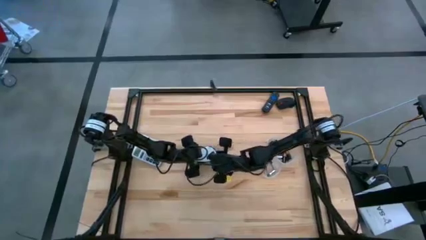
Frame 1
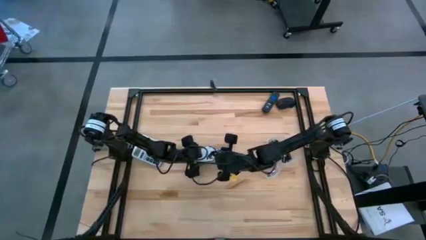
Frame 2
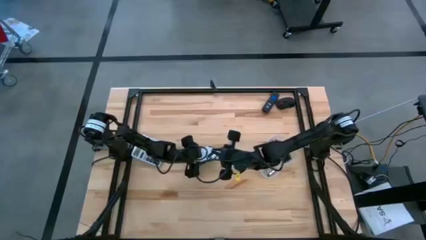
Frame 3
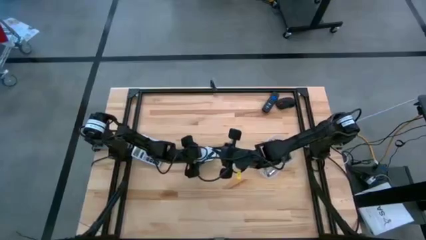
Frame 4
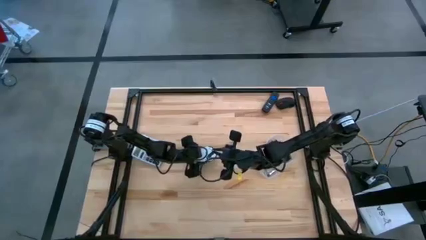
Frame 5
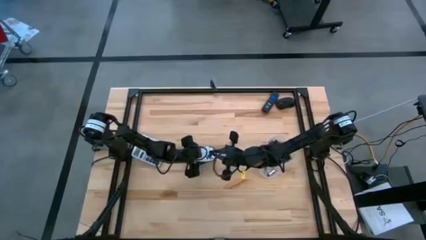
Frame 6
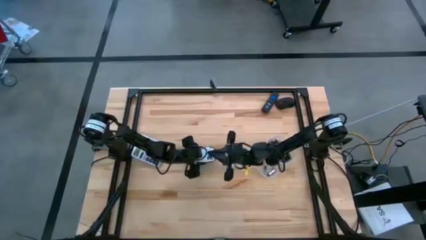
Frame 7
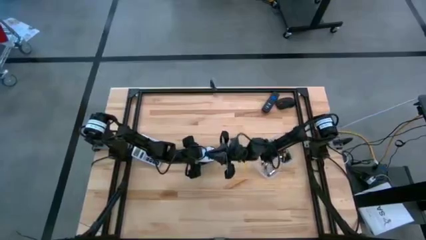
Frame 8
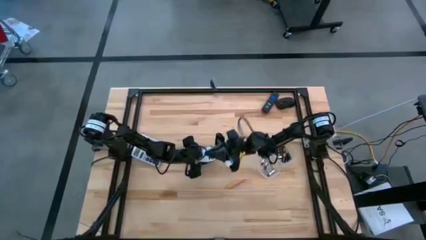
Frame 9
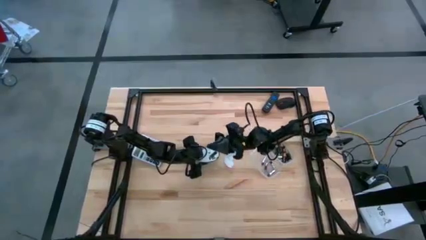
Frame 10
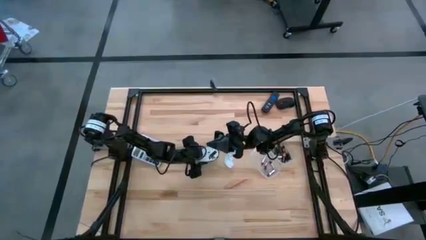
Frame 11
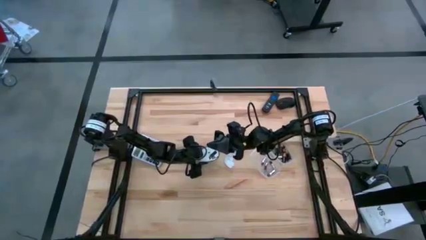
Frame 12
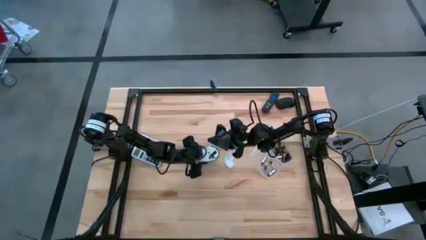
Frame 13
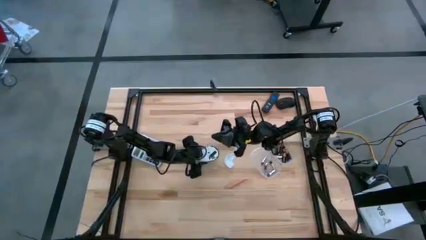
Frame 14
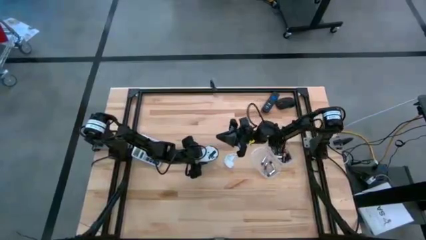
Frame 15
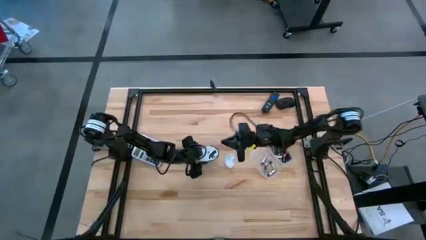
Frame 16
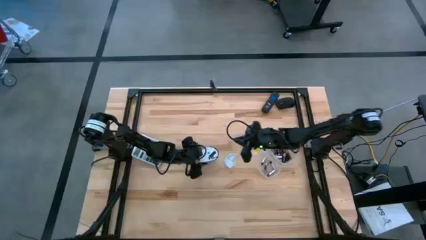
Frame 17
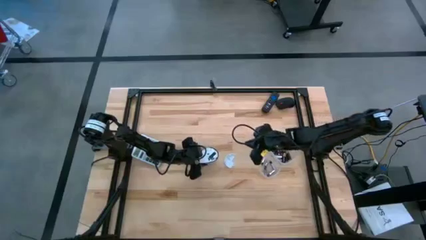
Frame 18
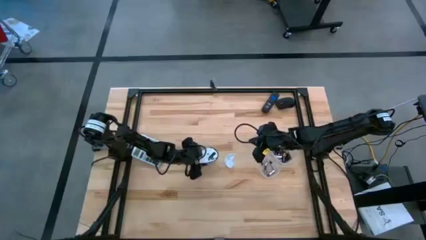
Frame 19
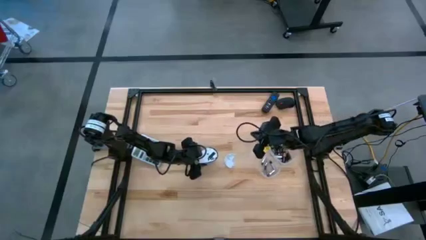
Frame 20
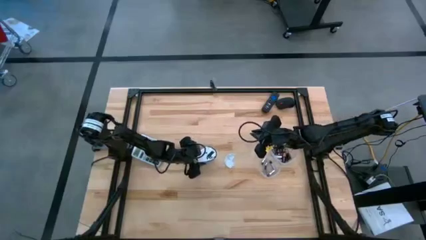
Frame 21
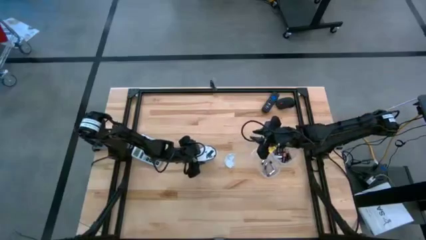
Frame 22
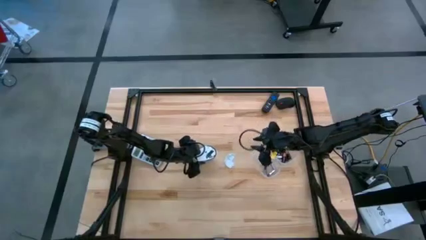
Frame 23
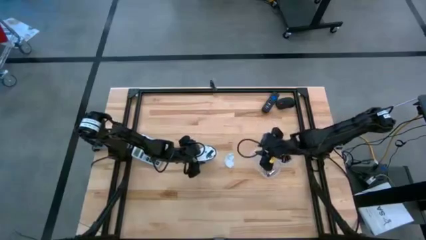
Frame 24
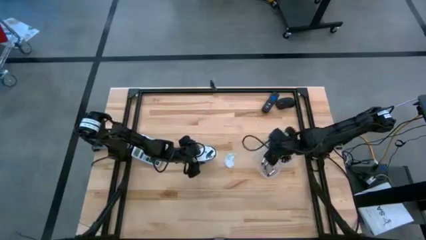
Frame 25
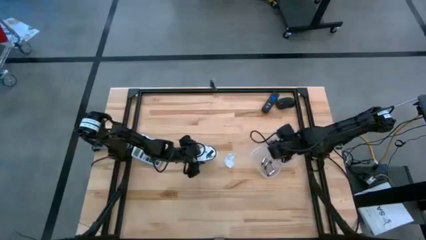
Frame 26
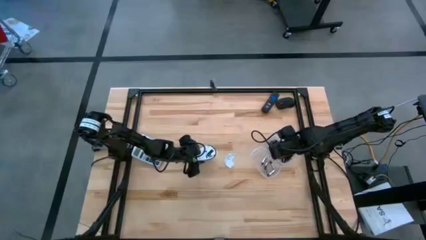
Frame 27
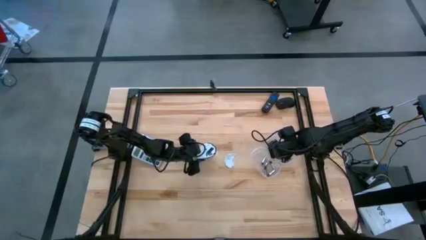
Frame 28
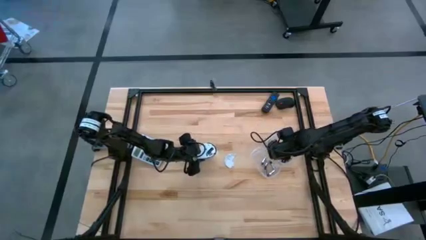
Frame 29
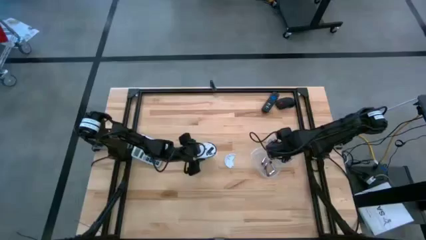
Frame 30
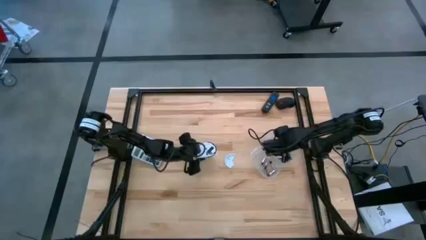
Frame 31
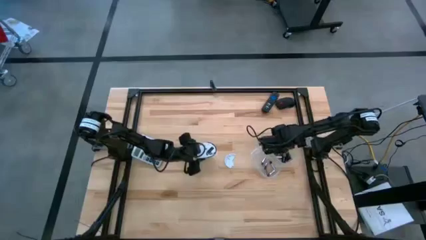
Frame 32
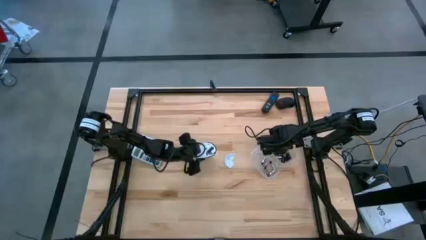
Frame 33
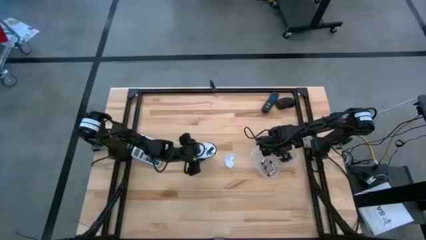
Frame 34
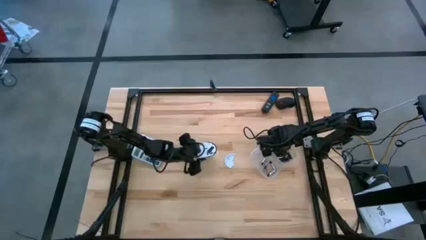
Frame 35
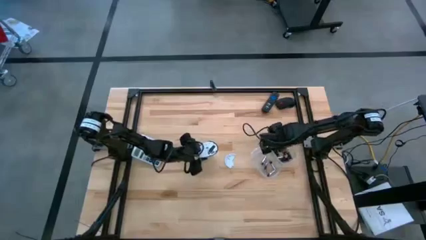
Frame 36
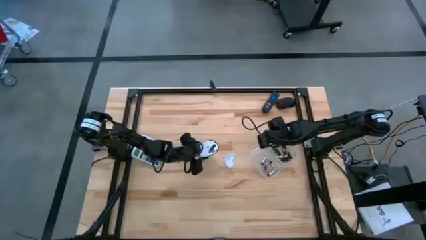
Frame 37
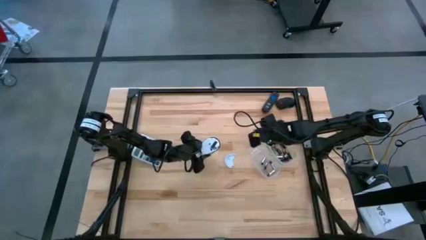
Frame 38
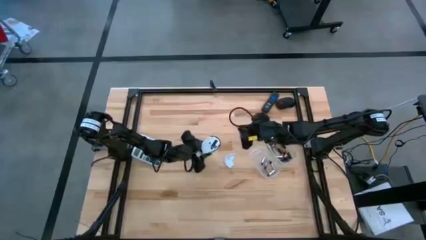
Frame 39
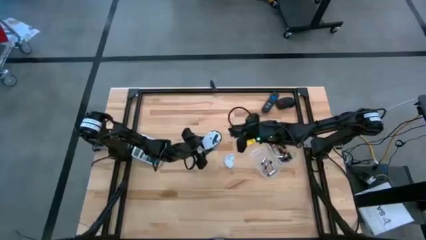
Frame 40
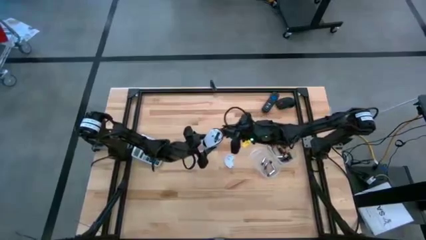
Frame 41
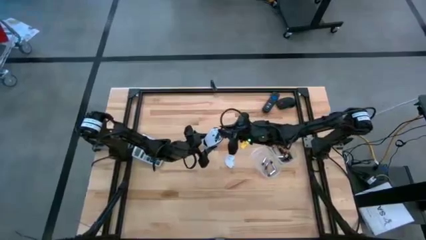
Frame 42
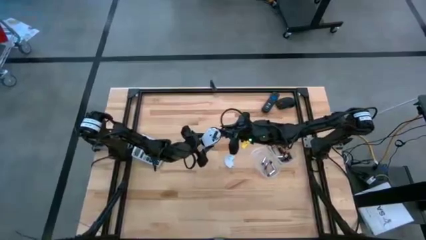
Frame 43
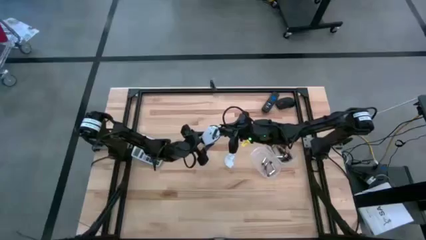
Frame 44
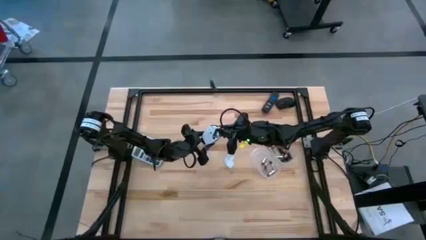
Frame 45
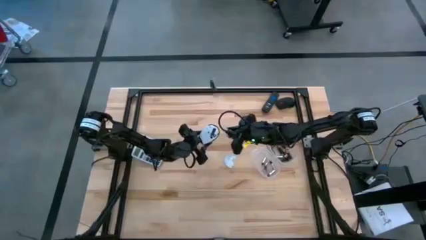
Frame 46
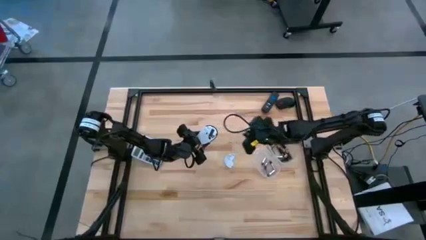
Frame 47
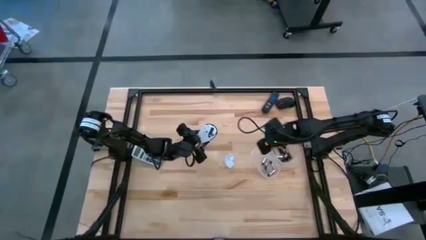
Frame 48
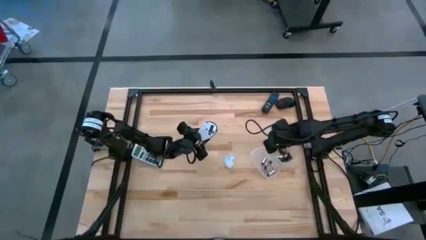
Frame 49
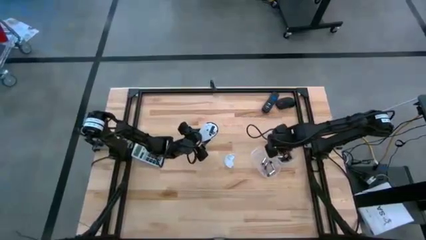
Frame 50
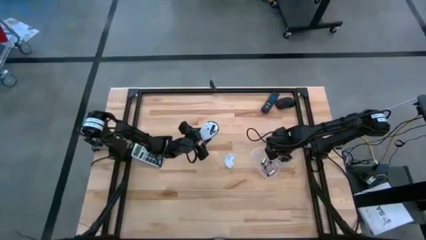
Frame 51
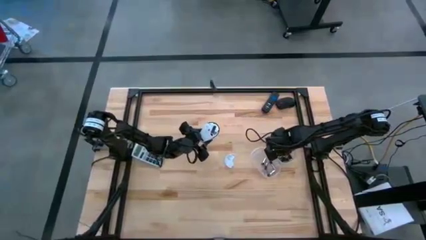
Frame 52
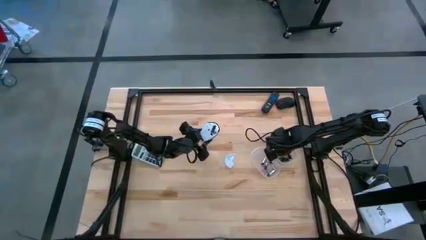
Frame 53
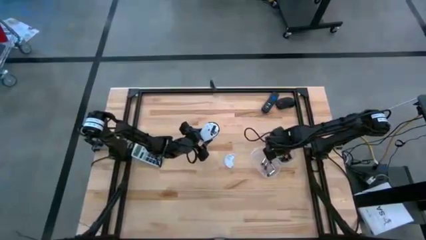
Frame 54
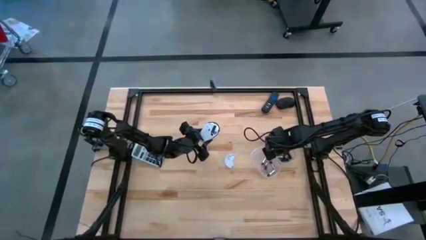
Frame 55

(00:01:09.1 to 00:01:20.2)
Task: Insert battery
Insert the brown battery into the black/white mouse battery compartment

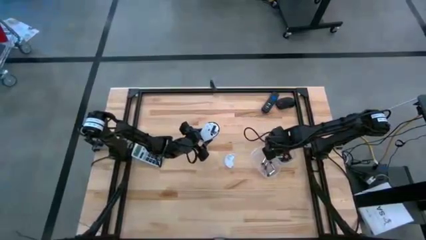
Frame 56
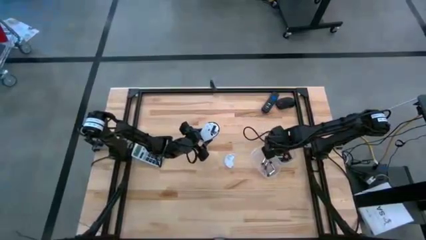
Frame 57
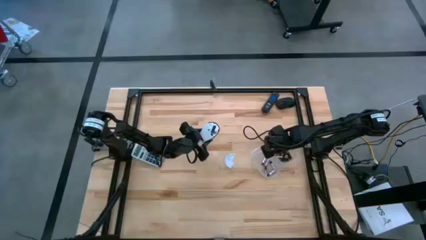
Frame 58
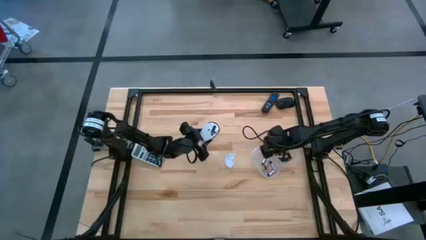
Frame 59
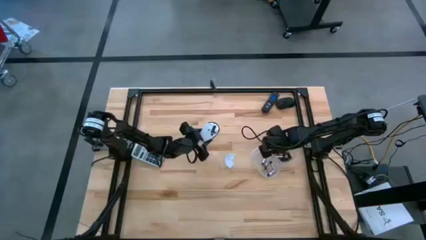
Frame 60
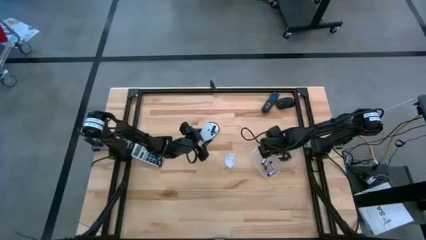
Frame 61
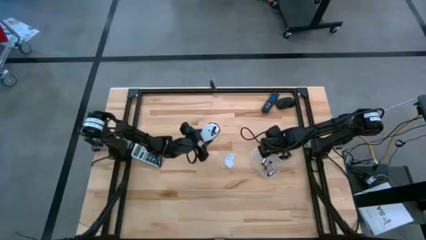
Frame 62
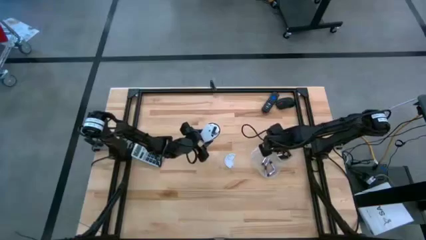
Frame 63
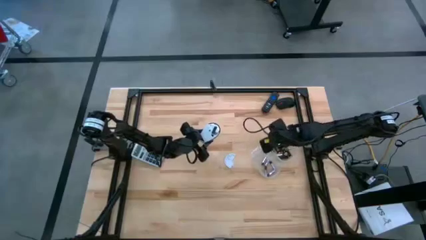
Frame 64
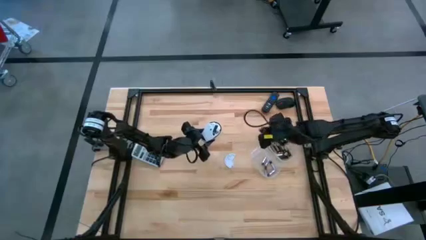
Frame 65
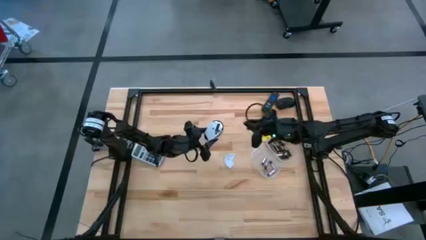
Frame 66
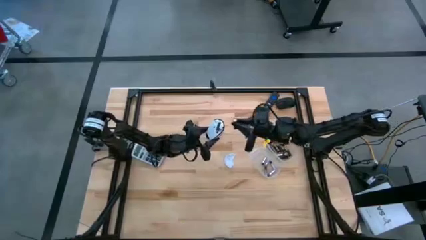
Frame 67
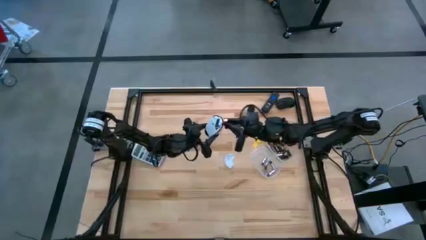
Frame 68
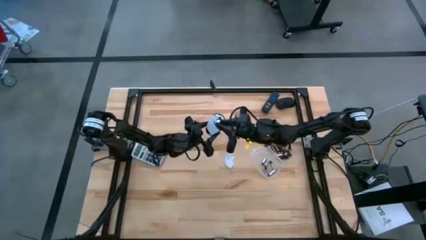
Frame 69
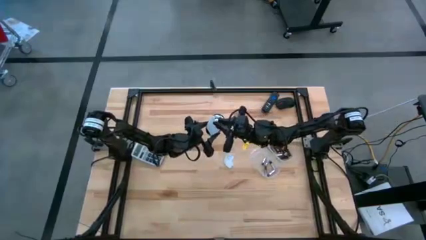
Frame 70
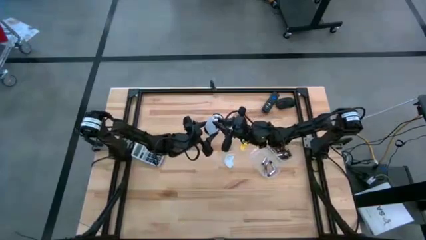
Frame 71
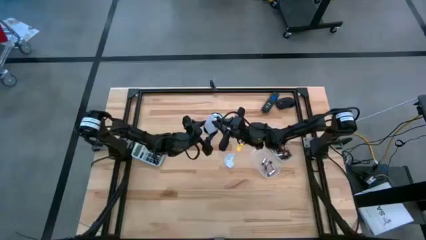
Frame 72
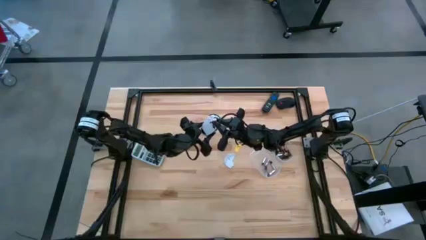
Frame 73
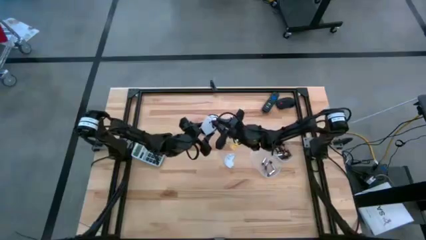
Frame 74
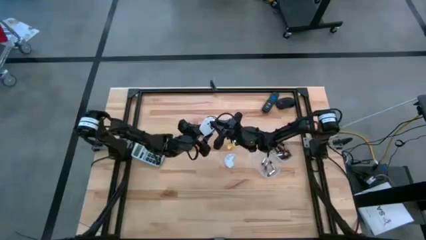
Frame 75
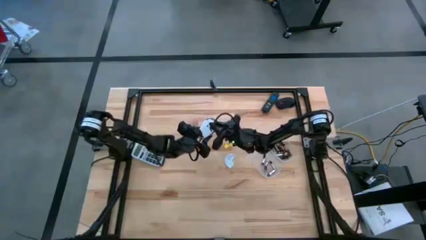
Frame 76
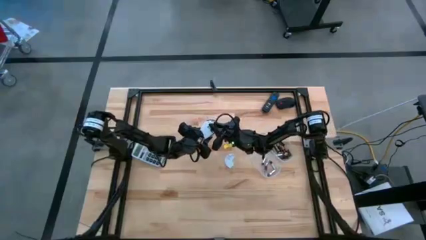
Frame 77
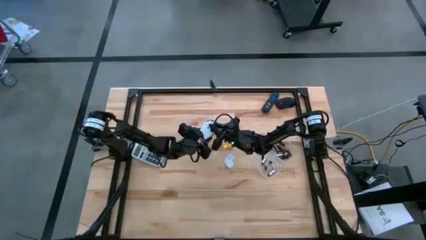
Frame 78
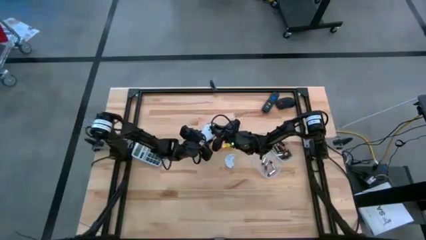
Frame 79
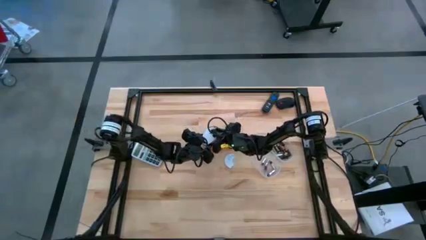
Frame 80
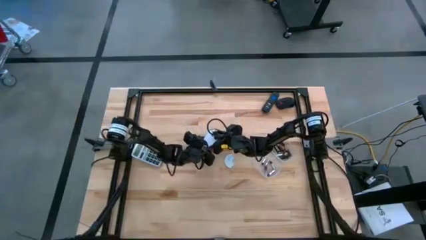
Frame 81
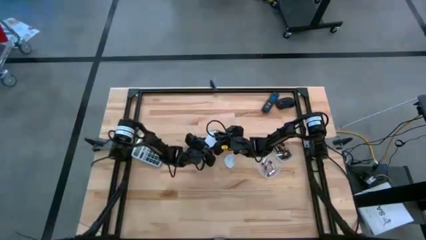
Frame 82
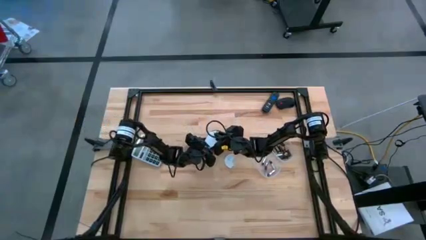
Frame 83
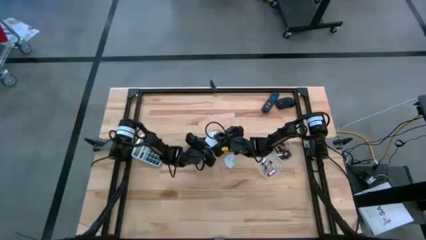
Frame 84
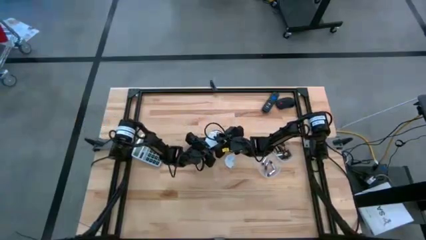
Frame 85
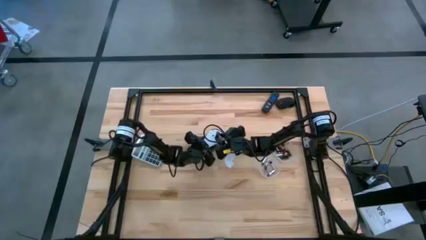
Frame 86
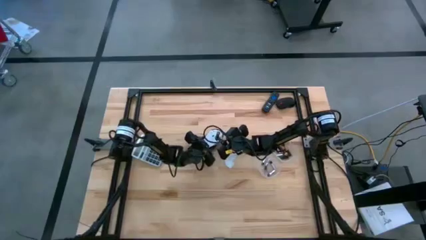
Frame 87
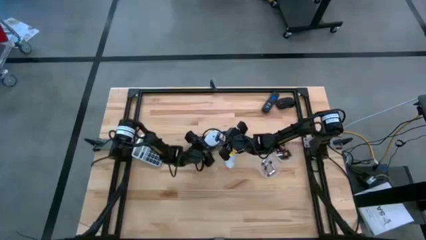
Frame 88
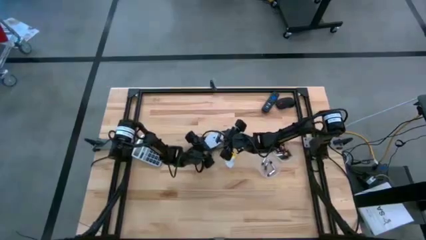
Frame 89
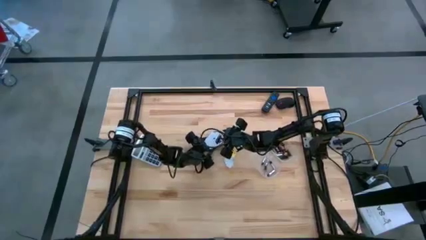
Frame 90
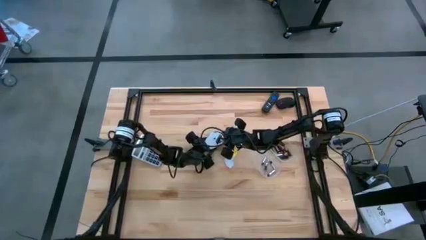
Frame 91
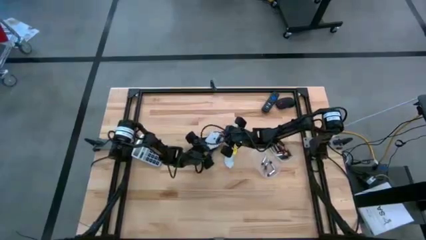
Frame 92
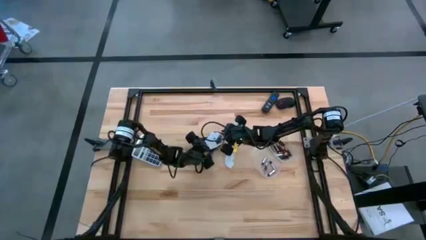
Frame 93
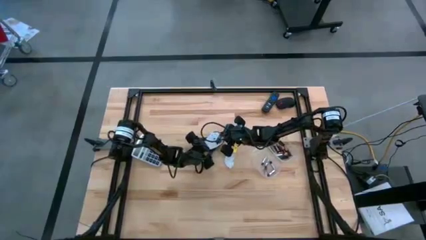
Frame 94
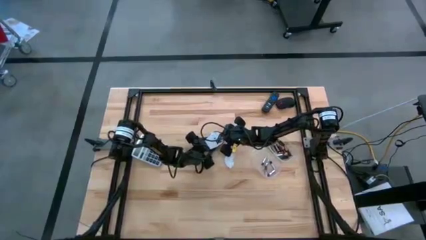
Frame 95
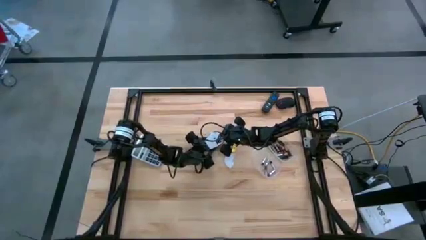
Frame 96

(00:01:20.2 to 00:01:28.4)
Insert the brown battery into the black/white mouse battery compartment
